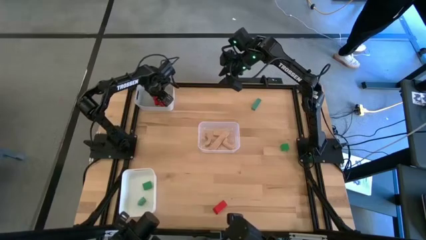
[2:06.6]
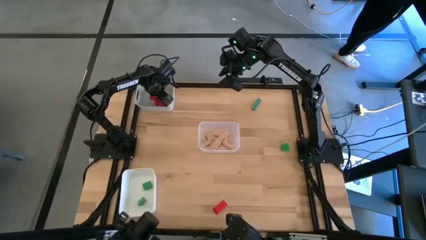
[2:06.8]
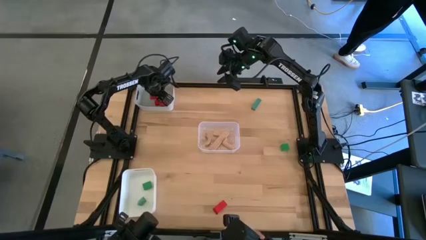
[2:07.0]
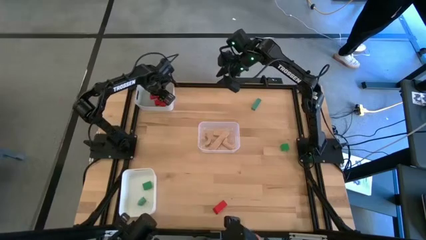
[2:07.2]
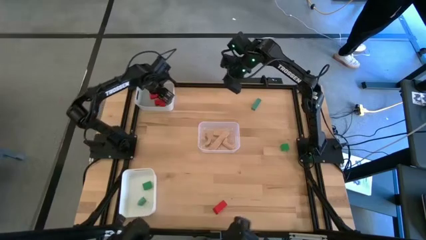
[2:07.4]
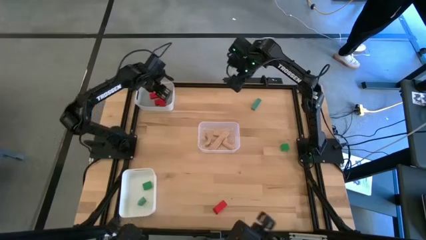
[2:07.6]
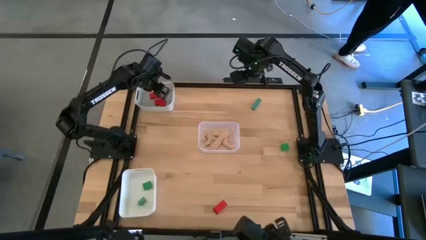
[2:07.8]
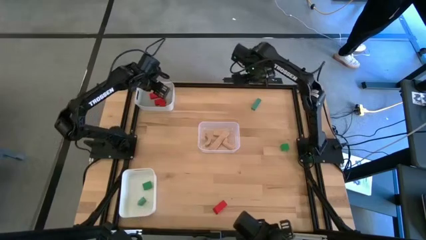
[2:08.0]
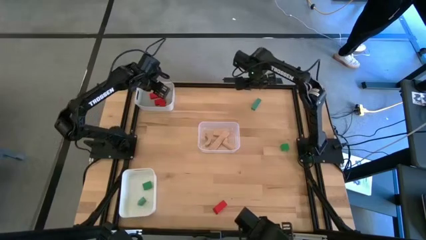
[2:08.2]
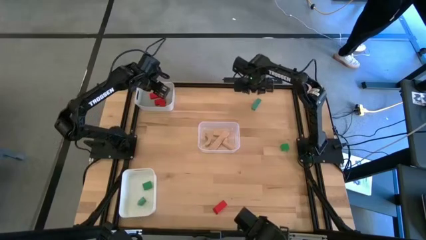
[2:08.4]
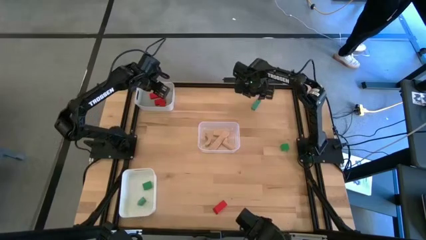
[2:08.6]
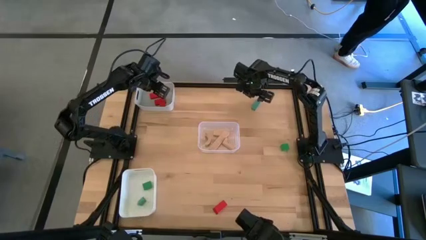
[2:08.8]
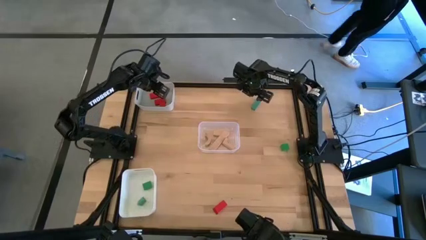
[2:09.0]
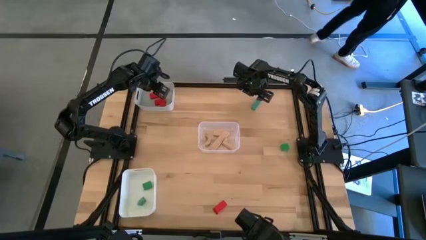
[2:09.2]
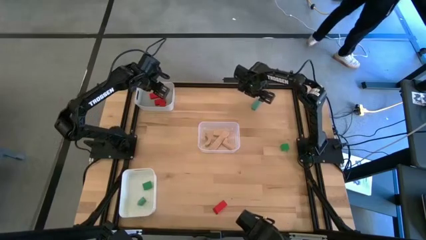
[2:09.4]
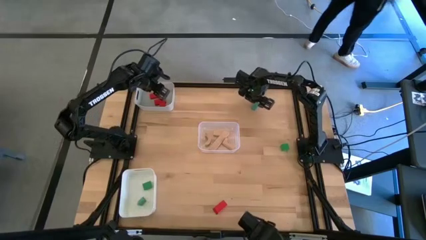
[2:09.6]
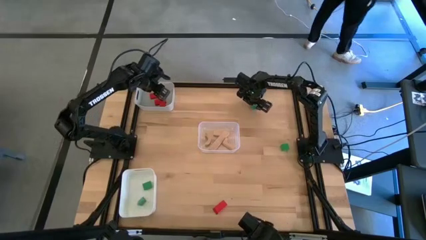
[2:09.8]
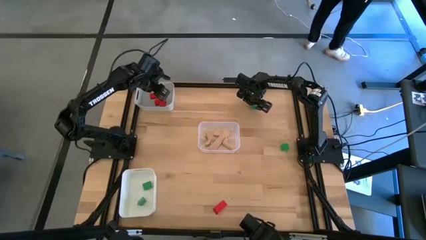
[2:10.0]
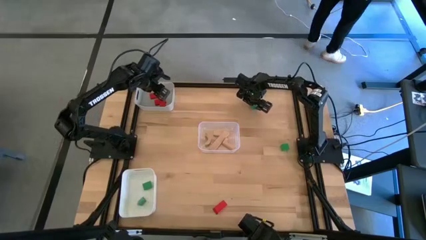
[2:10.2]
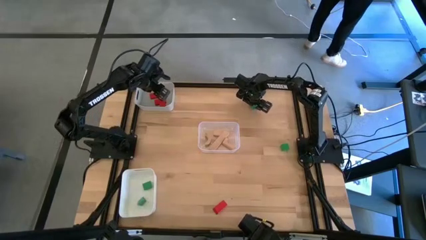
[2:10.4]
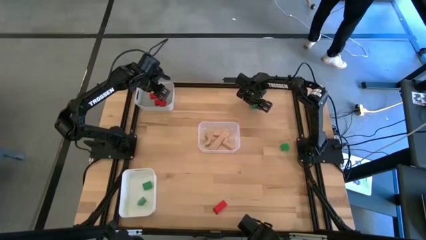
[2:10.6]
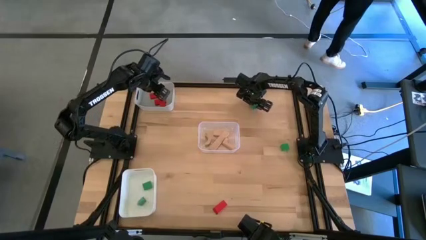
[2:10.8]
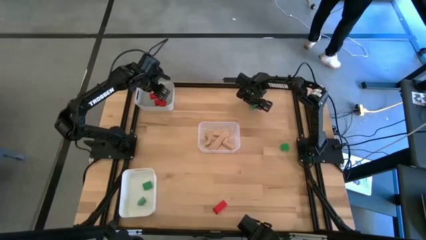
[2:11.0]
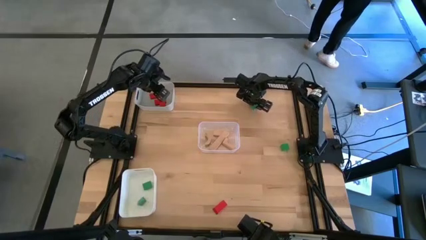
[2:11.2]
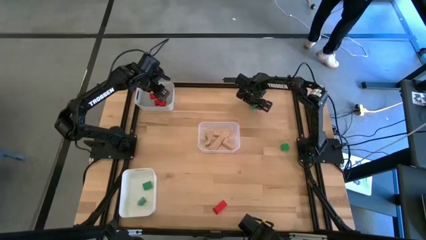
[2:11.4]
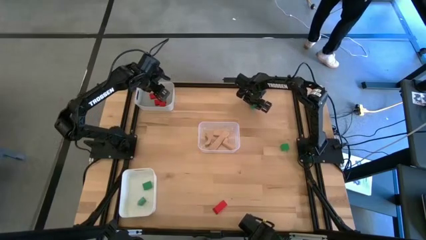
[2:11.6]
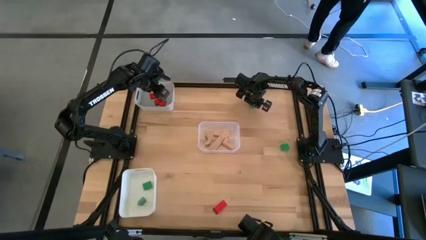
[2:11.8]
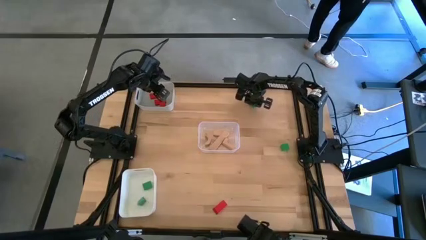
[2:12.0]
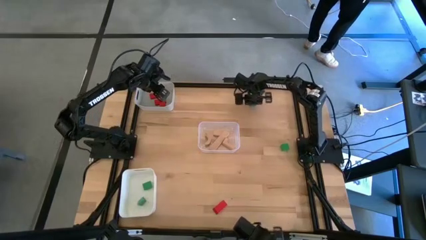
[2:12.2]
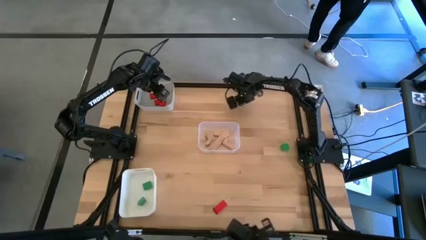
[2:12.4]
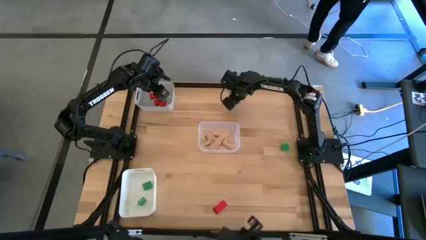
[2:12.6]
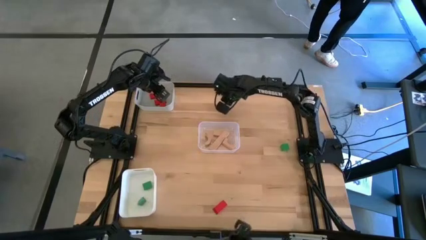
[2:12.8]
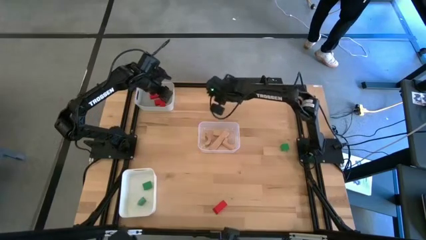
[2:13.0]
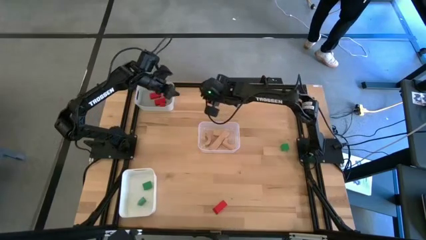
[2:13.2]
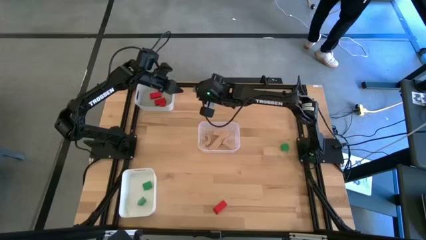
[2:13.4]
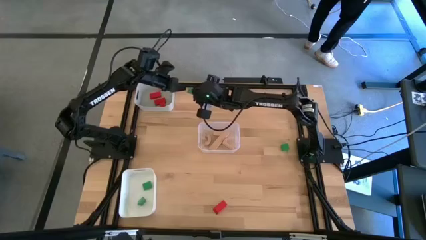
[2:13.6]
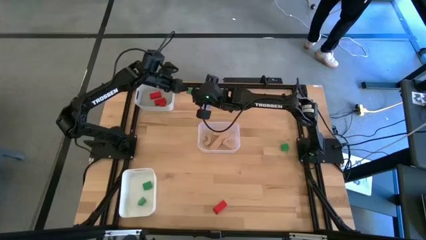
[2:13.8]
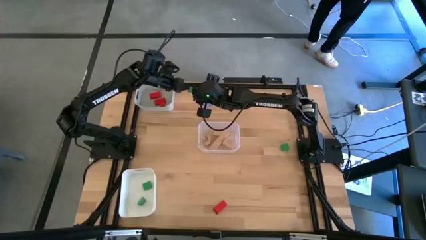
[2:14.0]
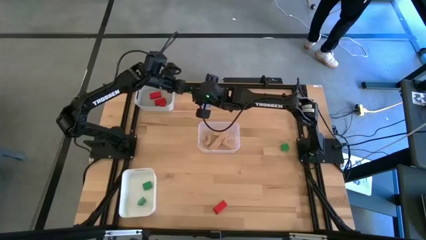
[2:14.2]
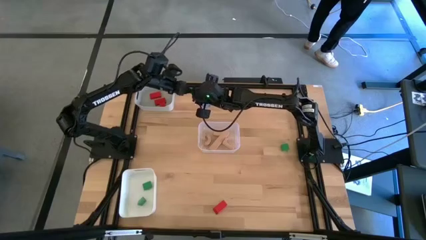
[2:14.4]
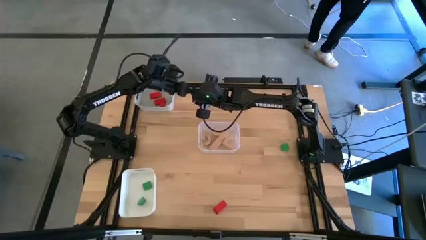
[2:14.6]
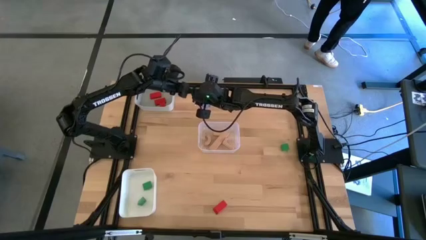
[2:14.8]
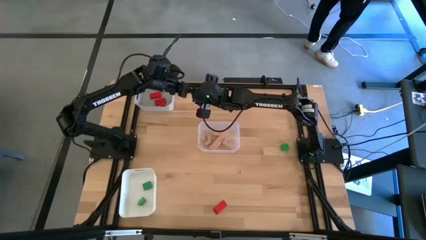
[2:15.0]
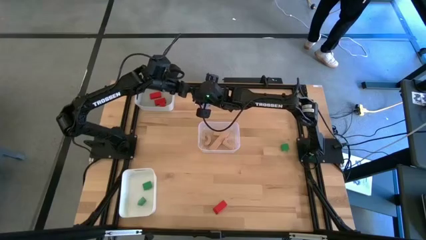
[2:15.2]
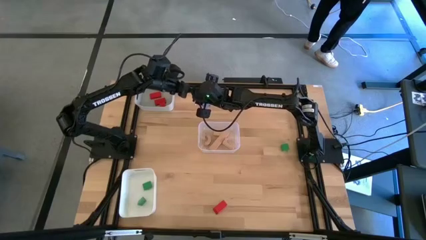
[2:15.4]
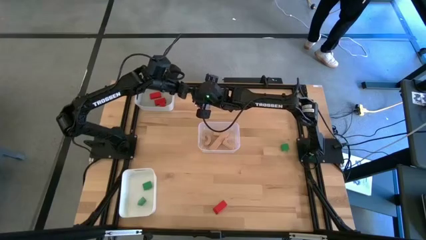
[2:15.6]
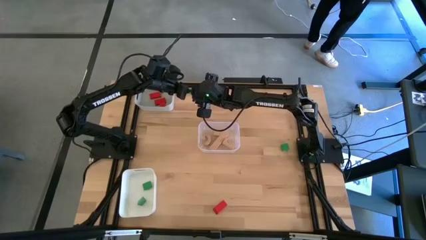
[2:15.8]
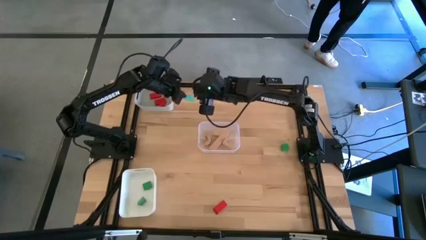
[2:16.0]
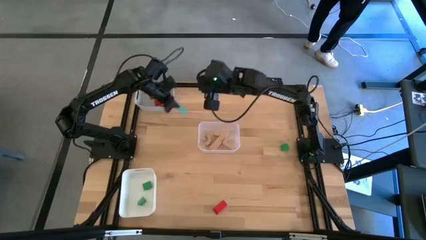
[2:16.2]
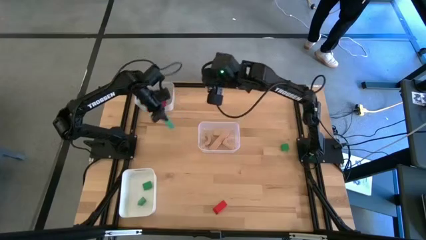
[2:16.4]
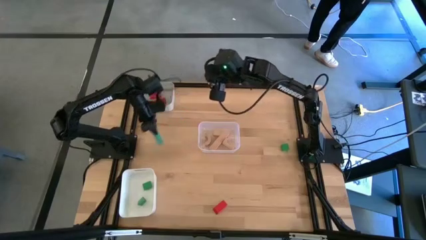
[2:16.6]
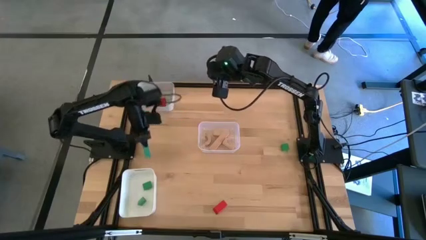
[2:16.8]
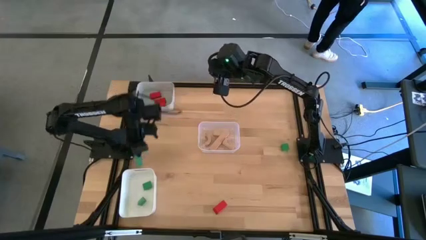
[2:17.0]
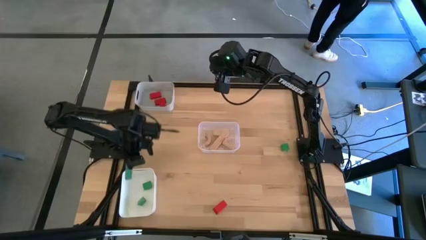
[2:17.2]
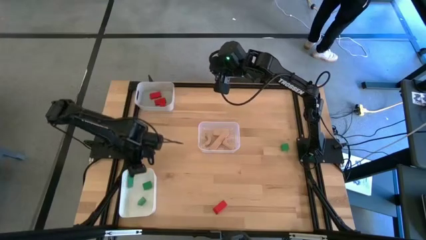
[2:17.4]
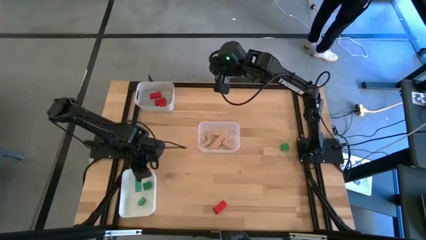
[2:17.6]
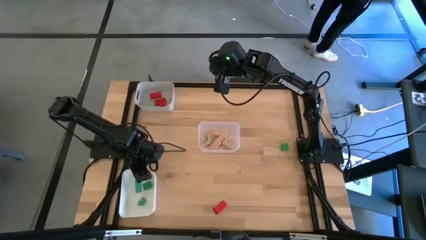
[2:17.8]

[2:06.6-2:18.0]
Task: Sort & place blocks by color
Put the green block into the white bin

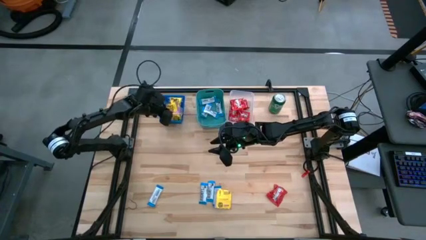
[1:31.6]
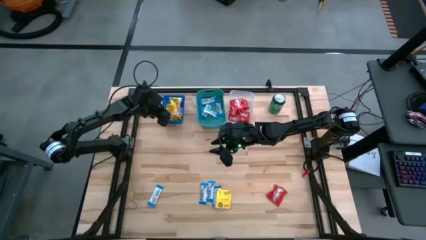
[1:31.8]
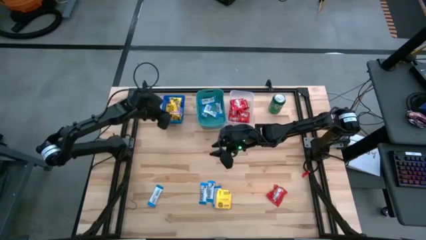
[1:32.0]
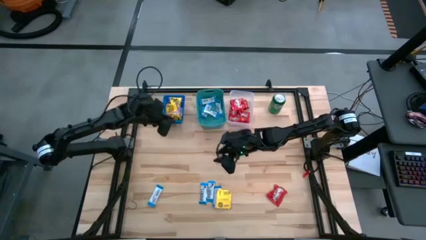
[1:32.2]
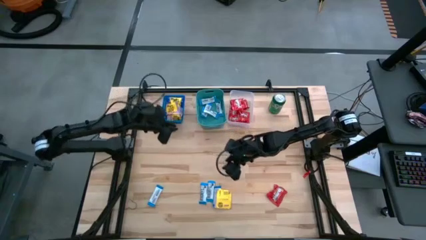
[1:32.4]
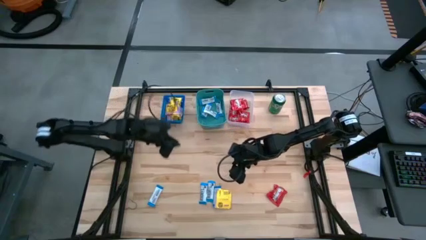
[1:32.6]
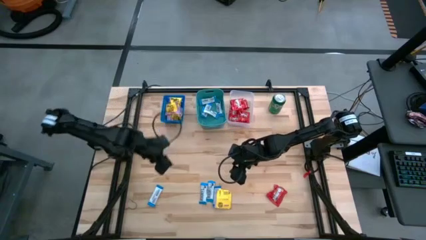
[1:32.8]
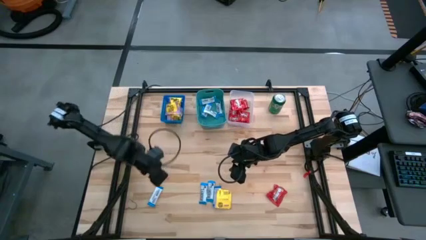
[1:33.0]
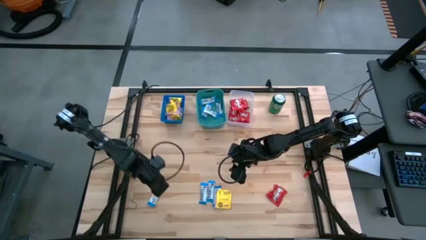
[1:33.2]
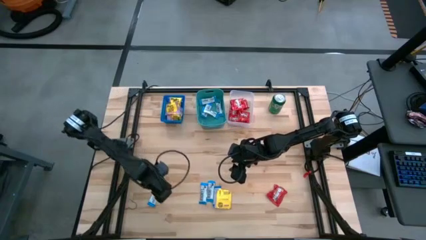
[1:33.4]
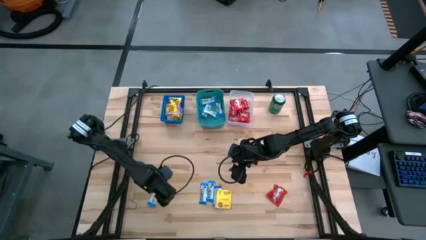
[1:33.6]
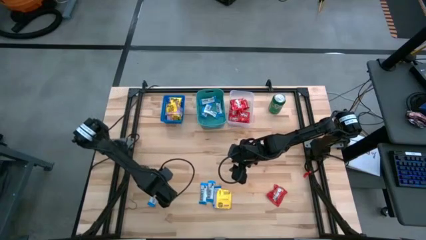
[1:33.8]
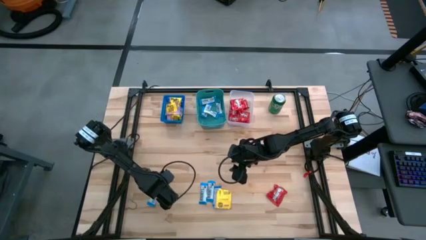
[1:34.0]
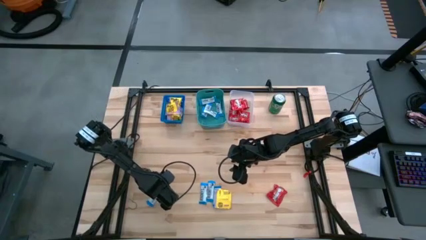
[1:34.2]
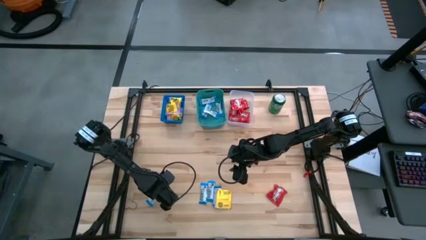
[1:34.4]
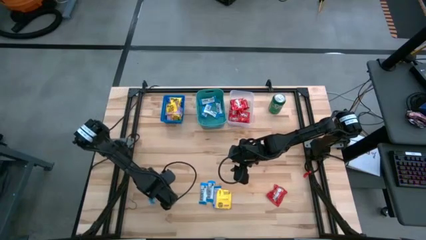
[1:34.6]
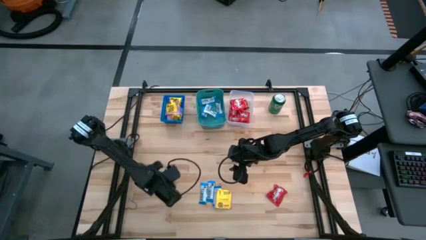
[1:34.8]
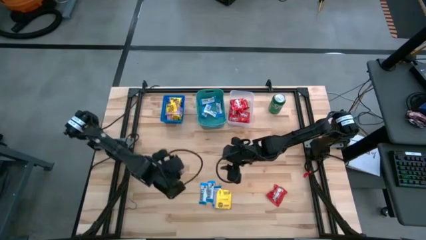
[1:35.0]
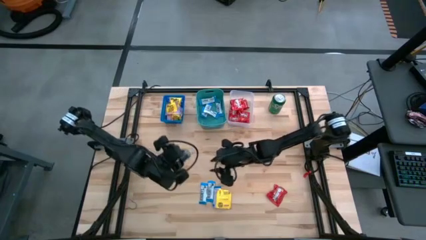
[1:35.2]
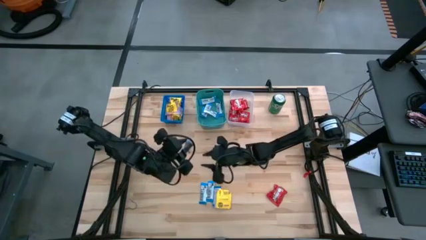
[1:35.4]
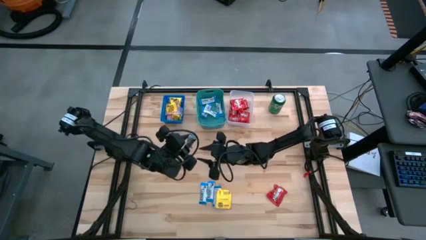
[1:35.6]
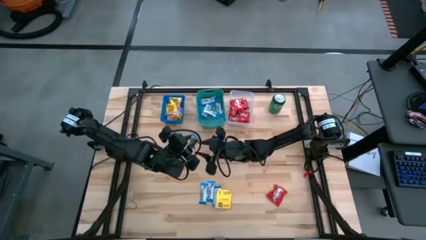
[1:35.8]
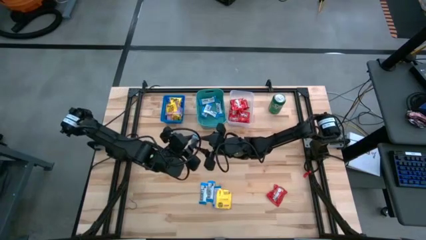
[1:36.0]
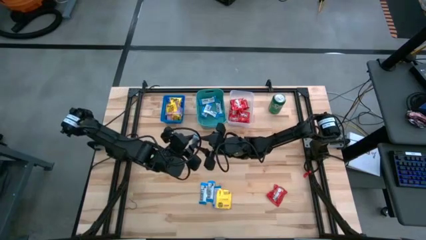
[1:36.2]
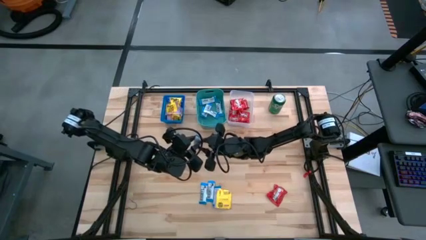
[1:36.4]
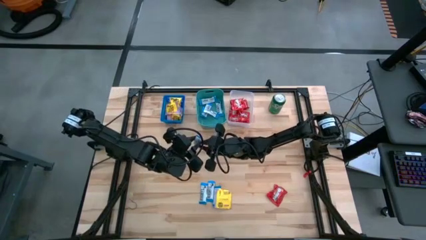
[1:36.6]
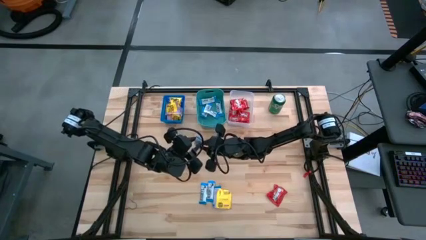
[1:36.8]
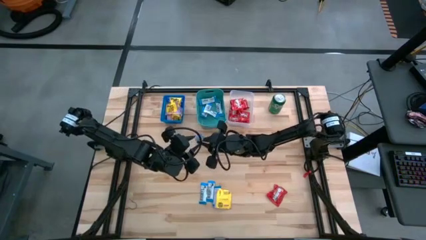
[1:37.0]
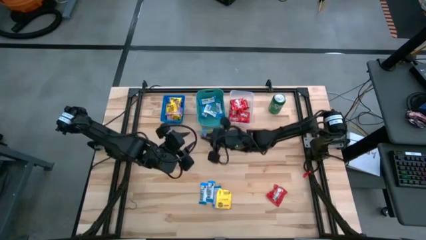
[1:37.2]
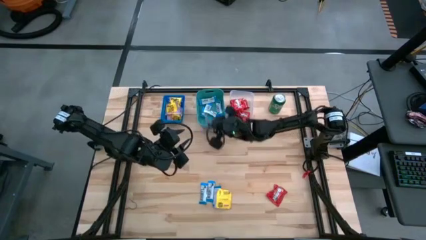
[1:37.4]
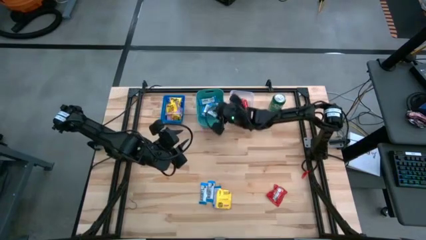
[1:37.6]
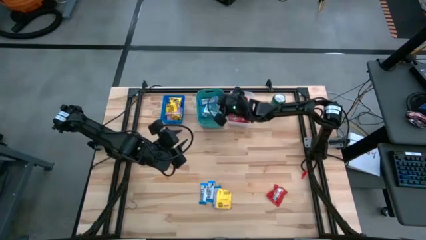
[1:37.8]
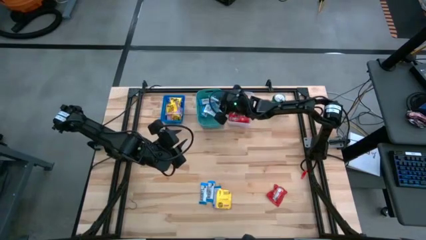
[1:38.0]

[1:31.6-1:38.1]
Task: Sort candy
Put the white chocolate bar into the green bin
